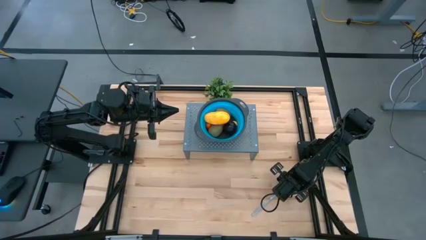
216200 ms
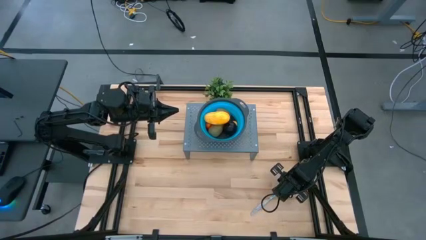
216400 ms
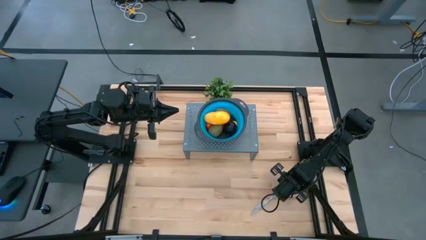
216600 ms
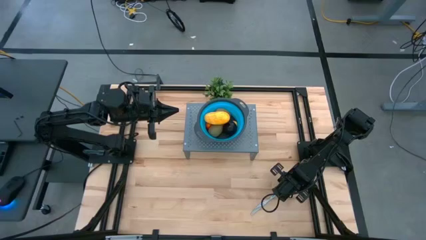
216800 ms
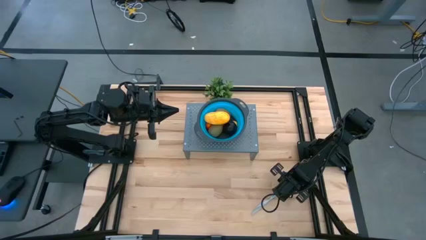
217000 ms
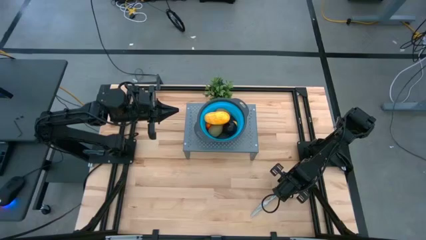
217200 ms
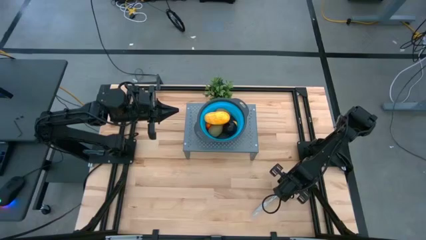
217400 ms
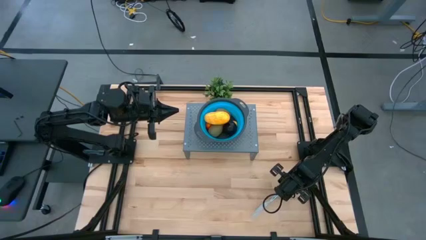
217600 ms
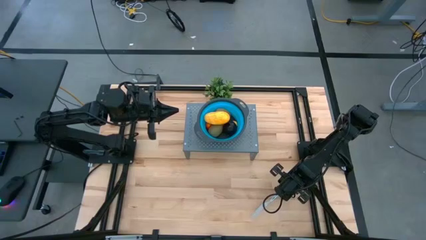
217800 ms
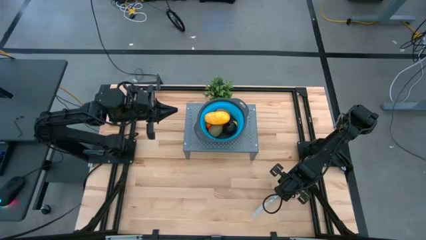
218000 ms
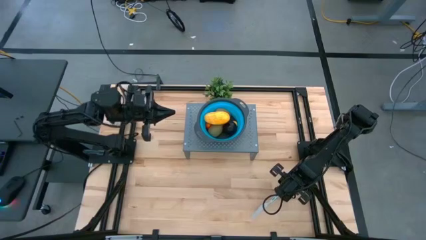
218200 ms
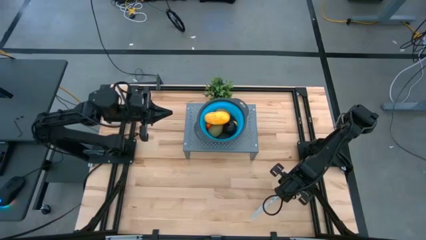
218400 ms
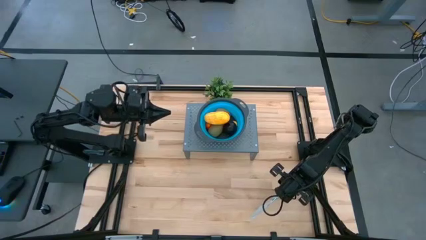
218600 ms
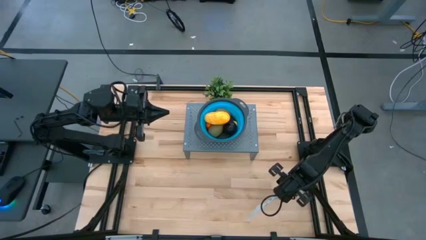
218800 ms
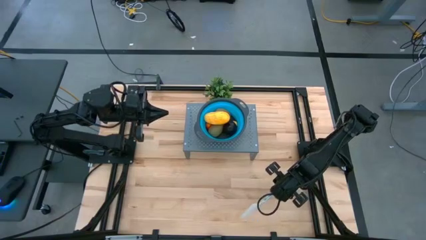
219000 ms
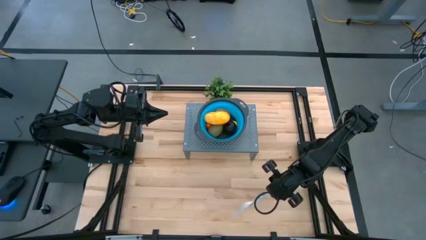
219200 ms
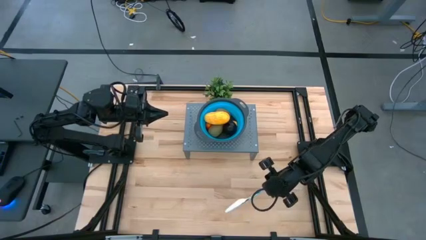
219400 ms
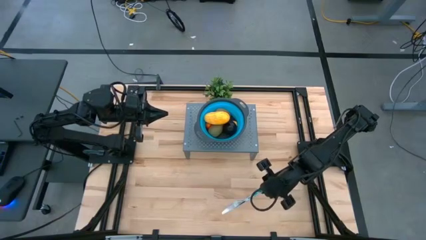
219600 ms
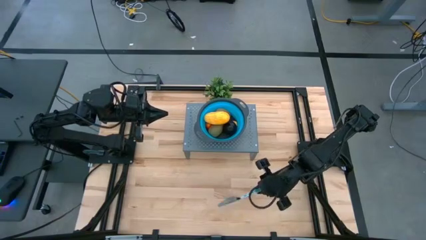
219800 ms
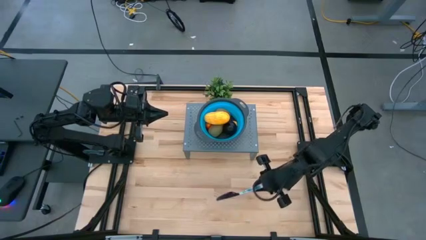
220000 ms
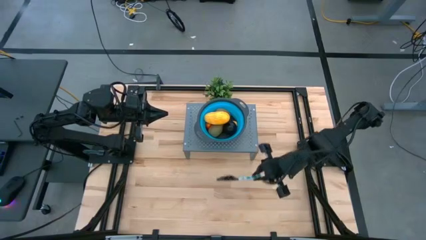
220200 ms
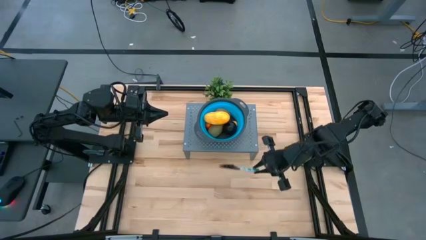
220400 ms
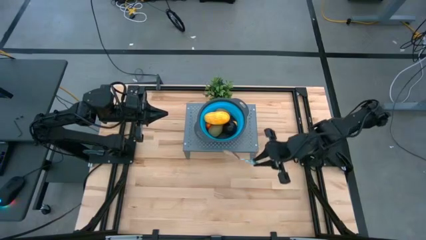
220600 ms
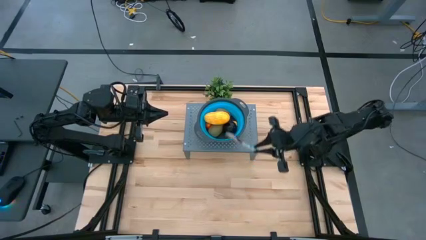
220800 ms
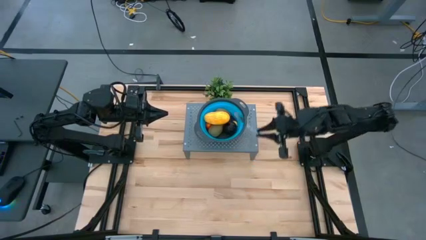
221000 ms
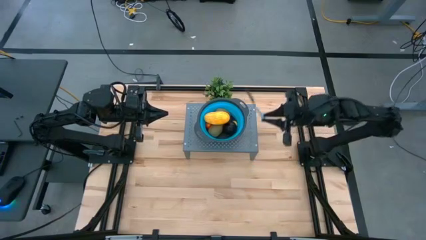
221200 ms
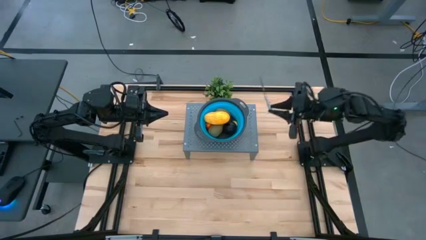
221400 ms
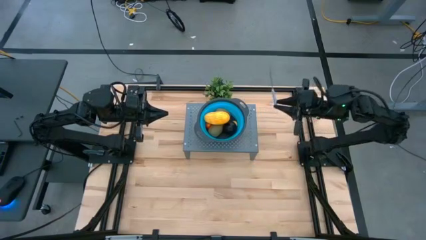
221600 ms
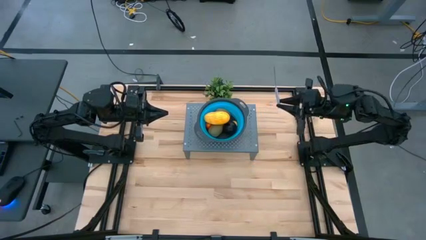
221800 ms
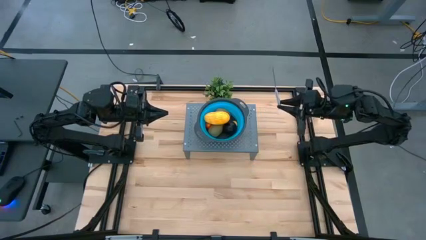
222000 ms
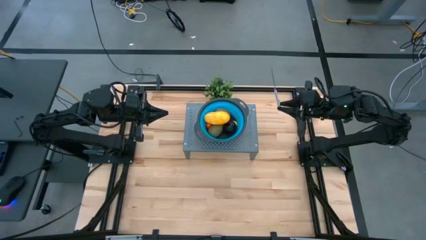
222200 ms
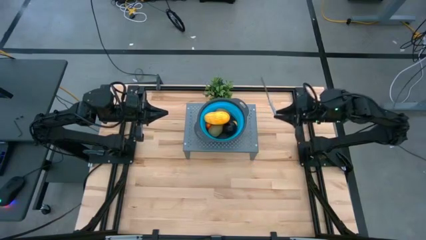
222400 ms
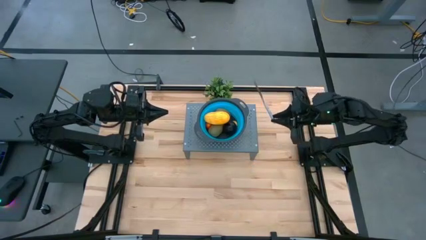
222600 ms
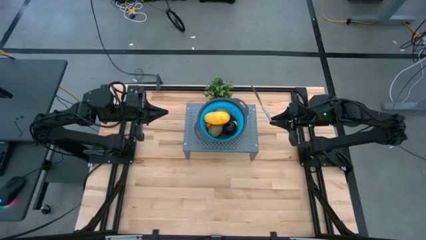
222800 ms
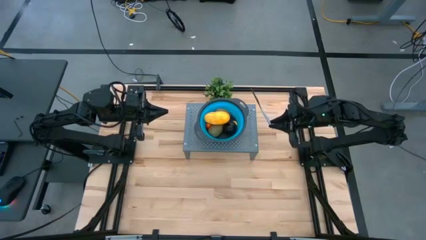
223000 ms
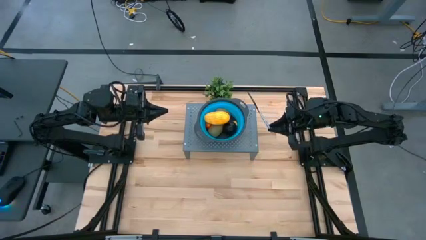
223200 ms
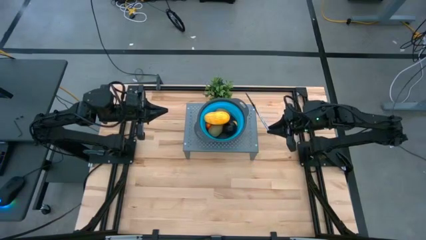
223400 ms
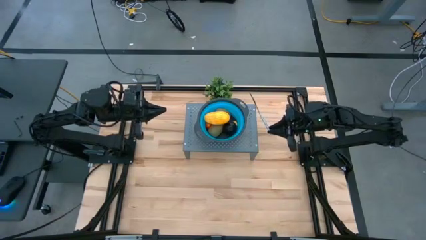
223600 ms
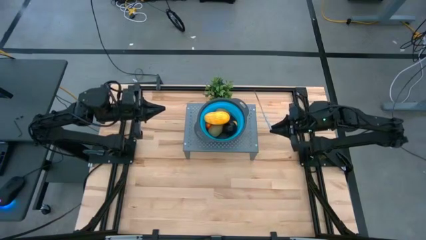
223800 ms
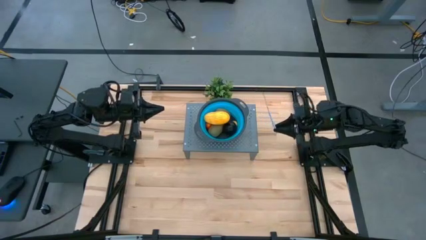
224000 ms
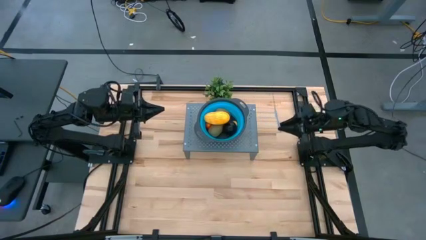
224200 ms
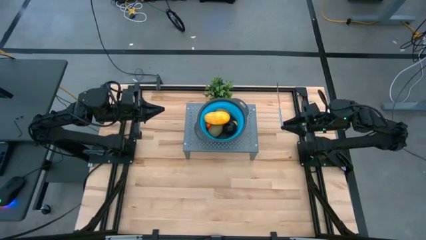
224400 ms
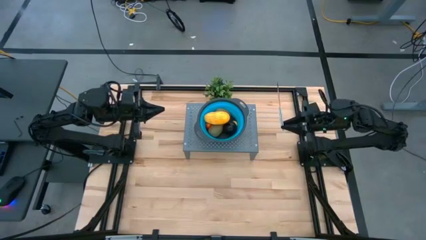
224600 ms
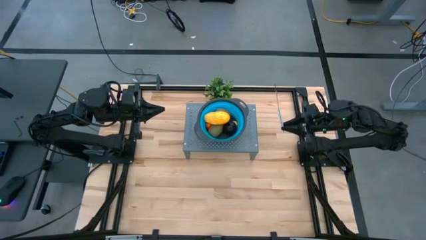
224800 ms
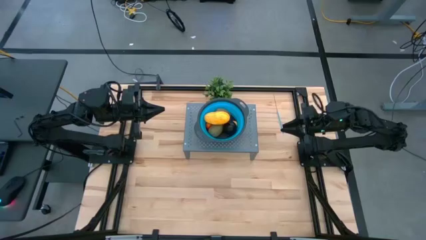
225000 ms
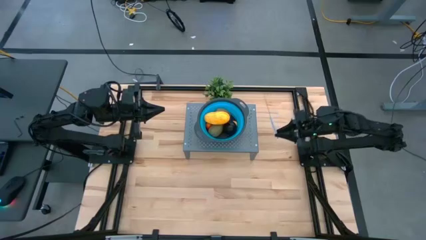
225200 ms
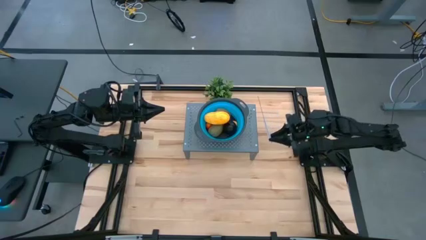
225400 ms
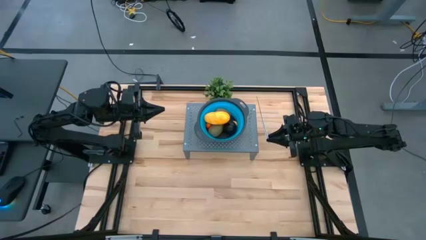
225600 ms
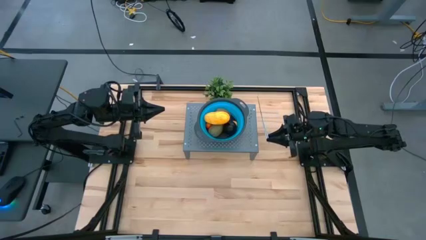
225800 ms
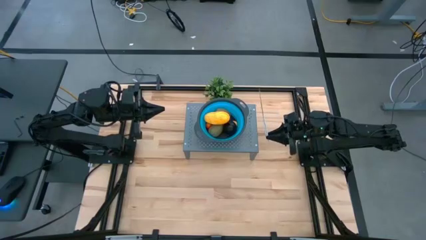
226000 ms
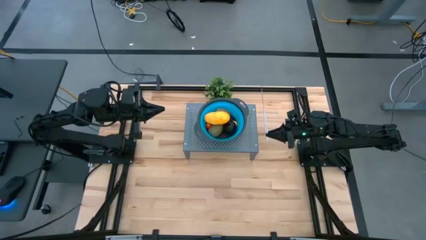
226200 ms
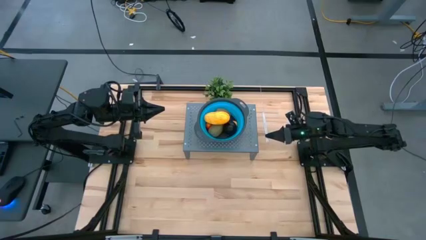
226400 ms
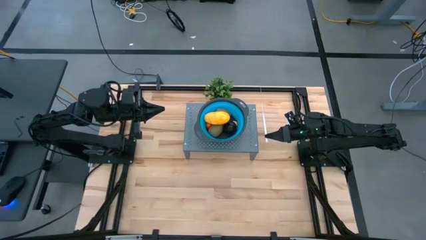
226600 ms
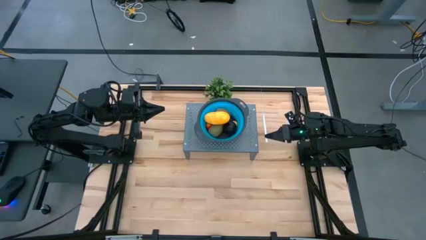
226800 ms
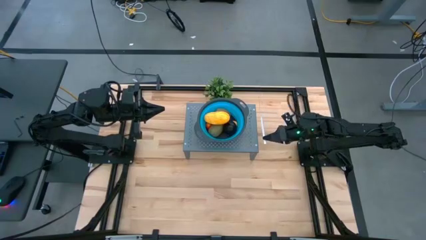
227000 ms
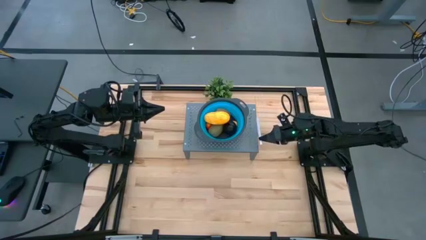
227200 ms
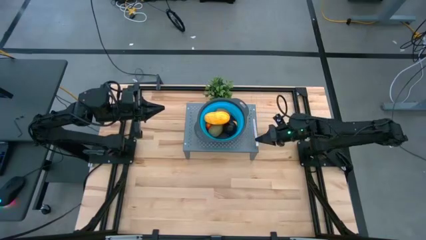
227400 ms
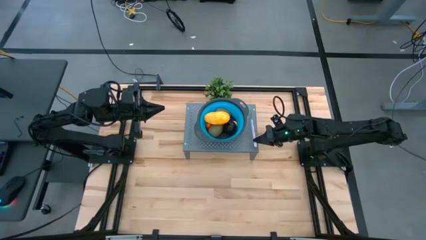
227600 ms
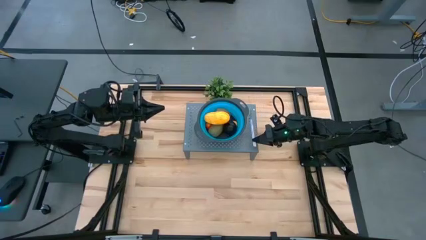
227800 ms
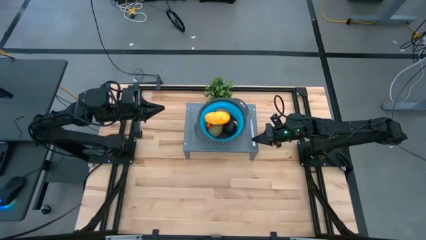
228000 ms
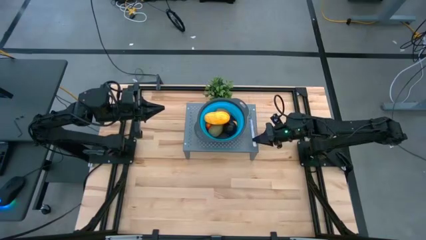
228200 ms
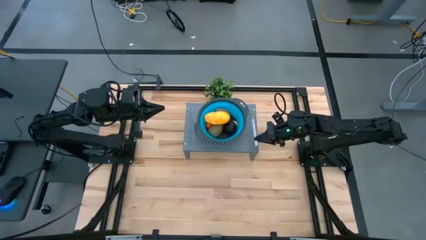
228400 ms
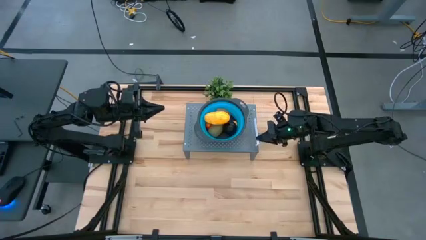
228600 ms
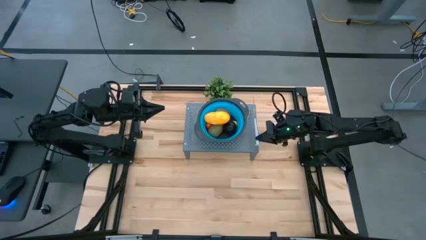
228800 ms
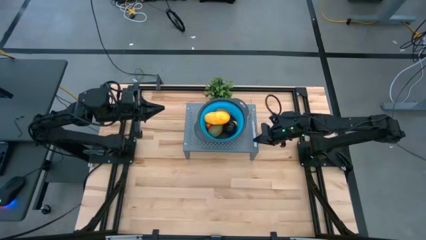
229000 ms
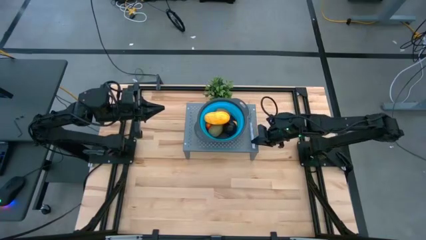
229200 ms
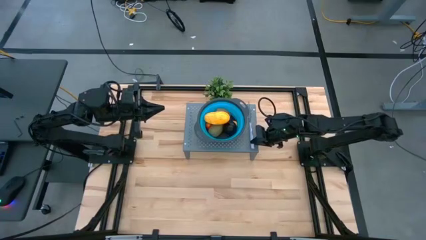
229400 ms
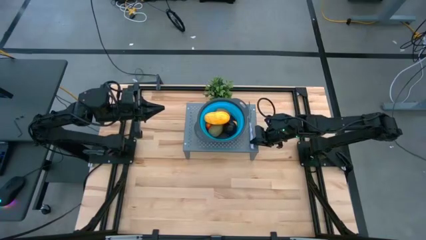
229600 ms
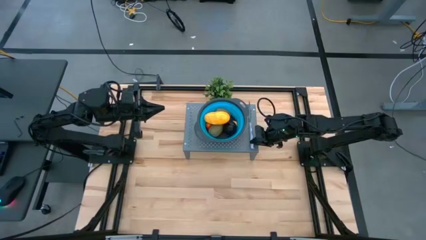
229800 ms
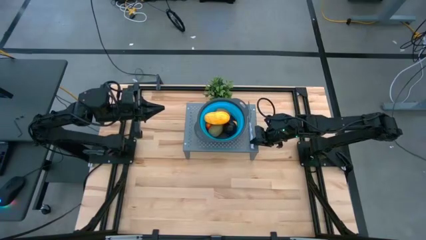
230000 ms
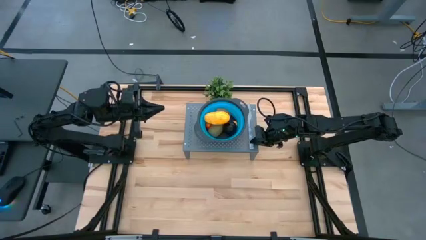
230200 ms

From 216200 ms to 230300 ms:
Task: Pick & Place Fruit
Put the knife on the shelf

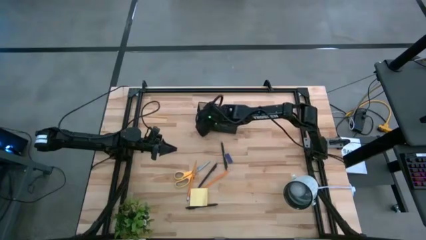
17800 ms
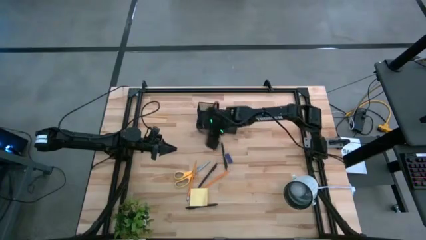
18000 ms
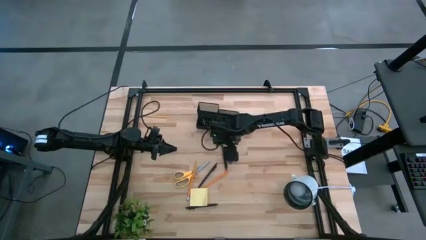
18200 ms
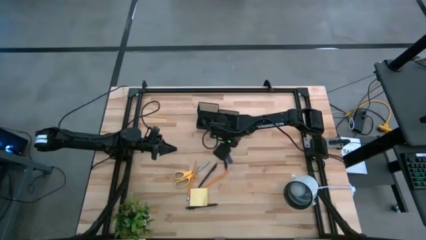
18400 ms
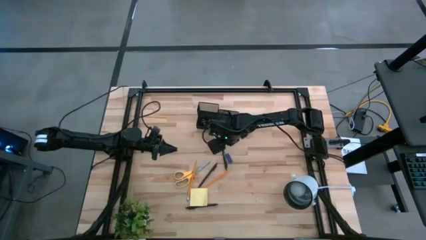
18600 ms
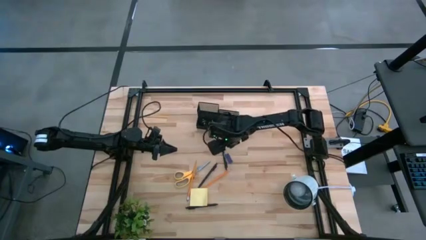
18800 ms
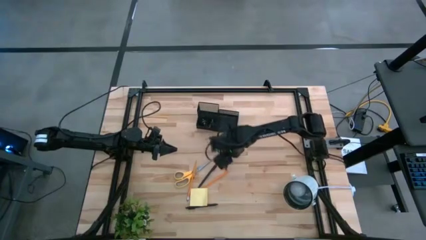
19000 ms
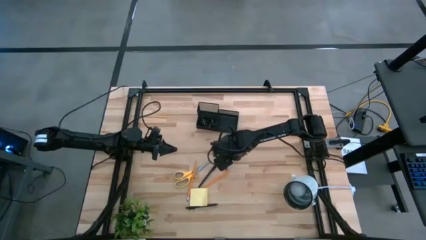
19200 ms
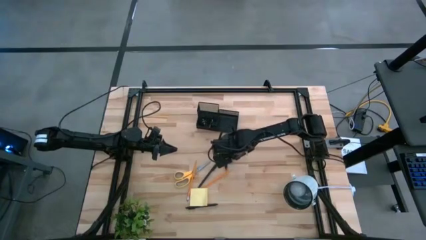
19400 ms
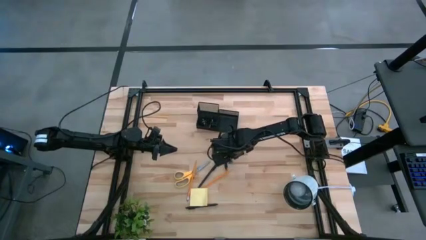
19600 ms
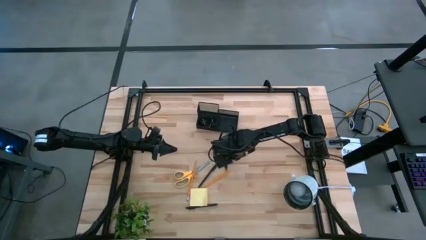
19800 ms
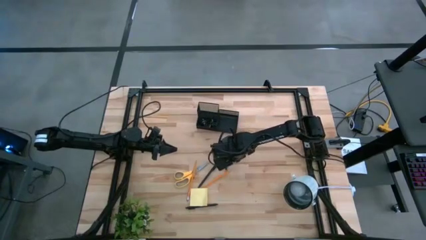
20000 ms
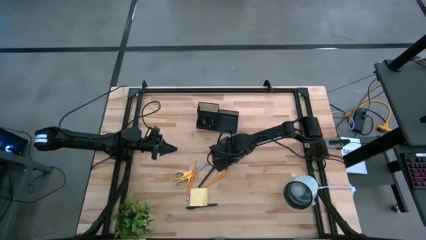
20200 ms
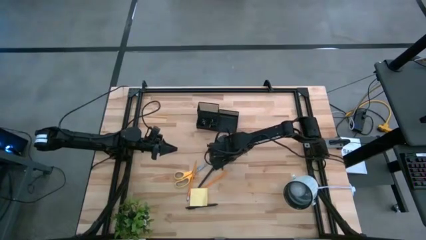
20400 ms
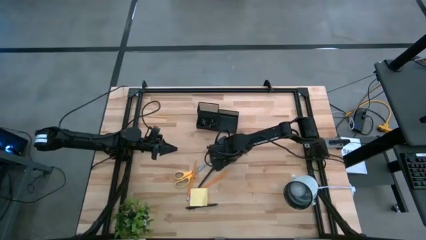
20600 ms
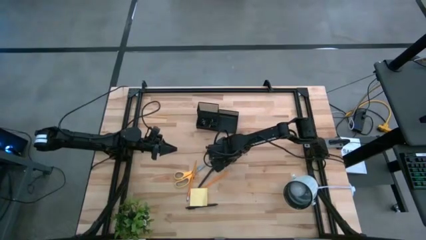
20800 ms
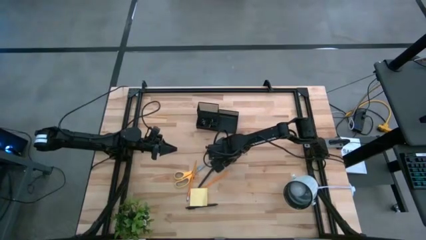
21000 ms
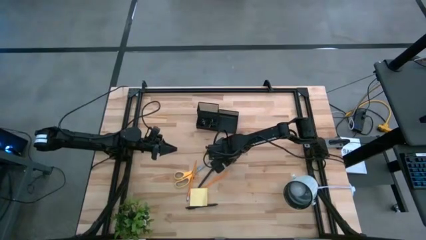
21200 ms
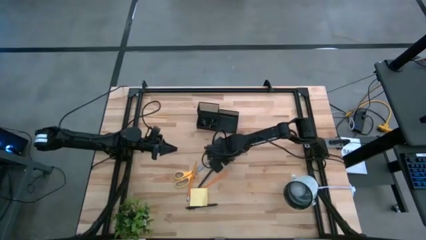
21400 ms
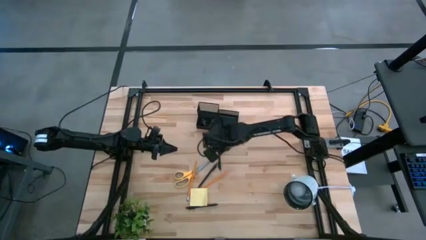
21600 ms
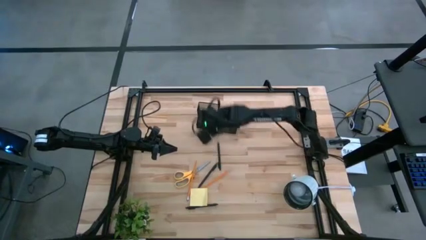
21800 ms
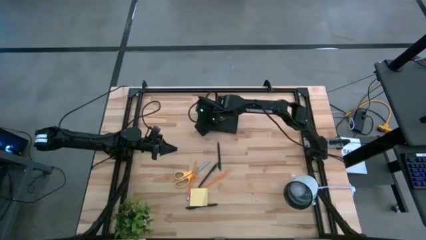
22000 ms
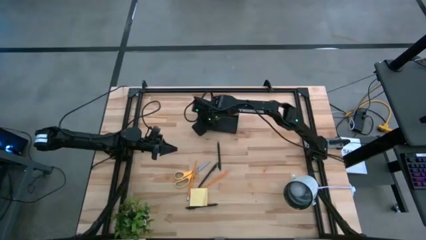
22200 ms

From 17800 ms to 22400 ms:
Task: Pick and place office supplies into organizer
Put the blue eraser into the desk organizer
